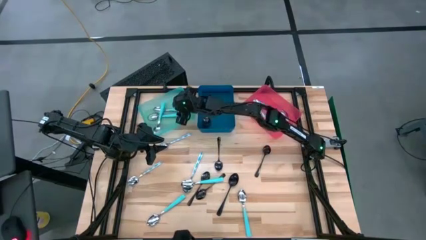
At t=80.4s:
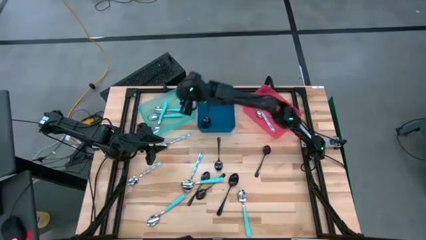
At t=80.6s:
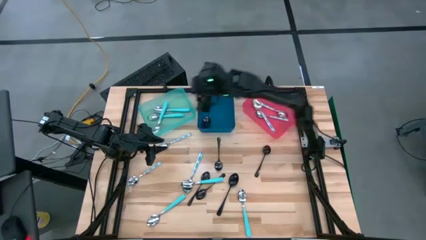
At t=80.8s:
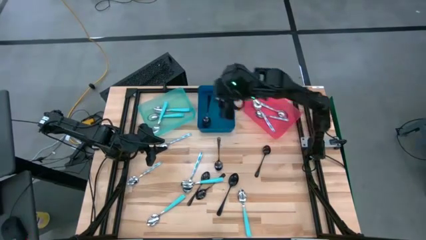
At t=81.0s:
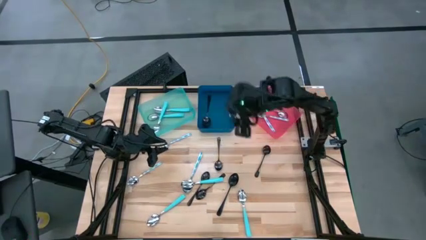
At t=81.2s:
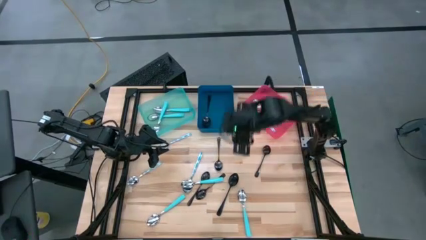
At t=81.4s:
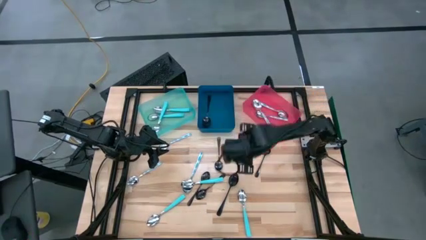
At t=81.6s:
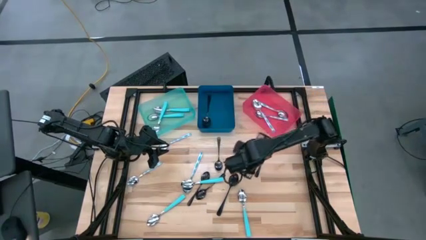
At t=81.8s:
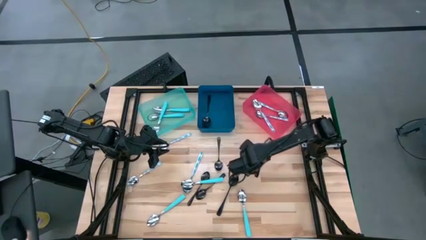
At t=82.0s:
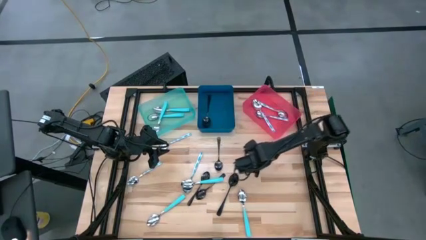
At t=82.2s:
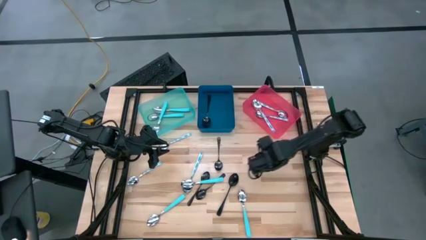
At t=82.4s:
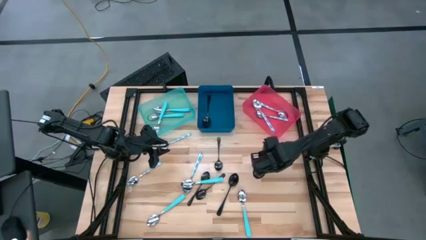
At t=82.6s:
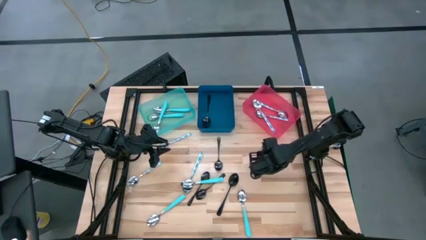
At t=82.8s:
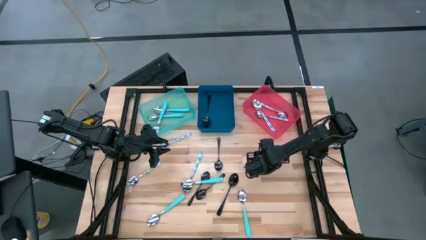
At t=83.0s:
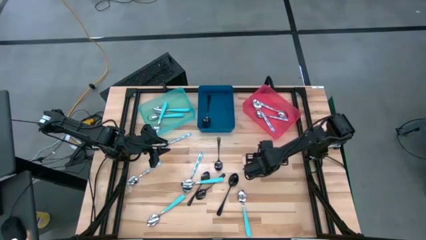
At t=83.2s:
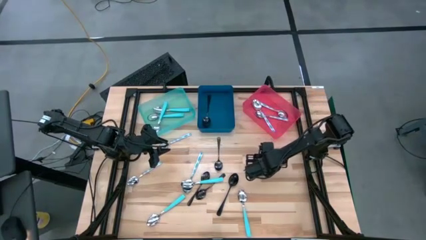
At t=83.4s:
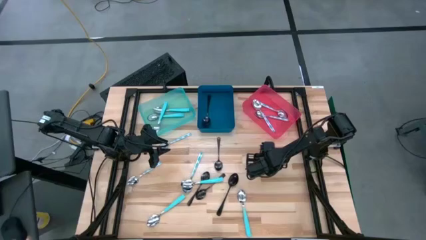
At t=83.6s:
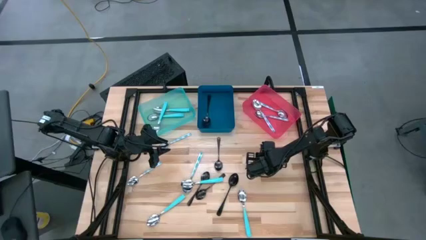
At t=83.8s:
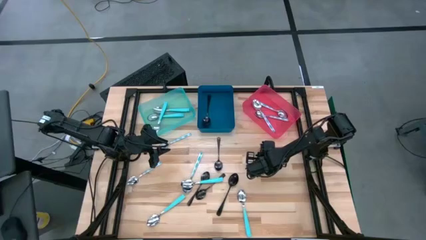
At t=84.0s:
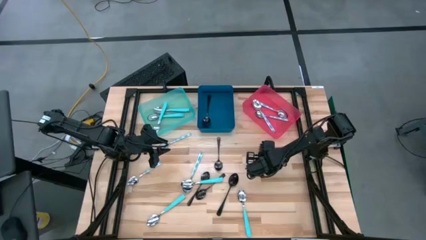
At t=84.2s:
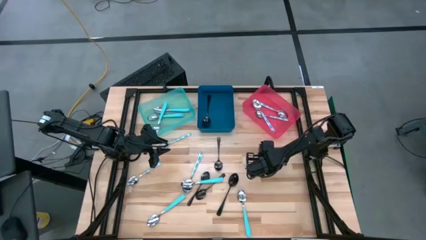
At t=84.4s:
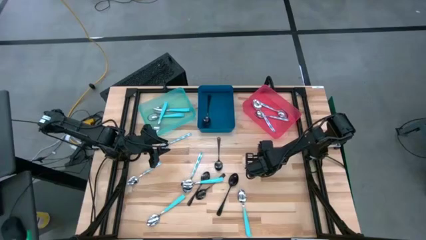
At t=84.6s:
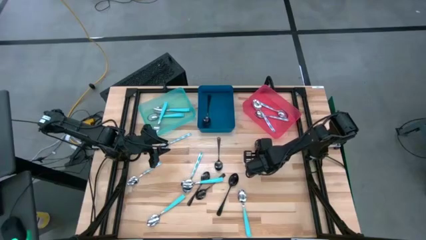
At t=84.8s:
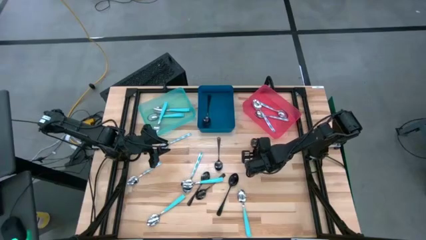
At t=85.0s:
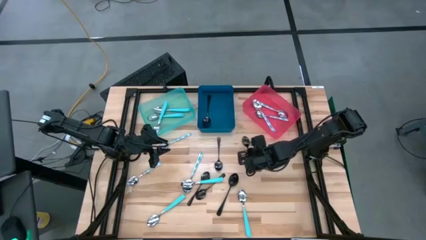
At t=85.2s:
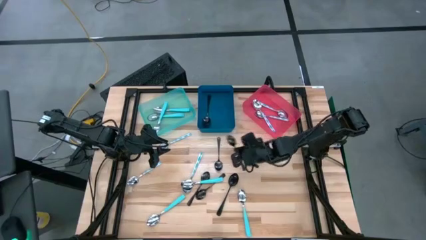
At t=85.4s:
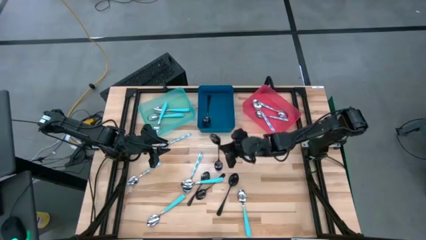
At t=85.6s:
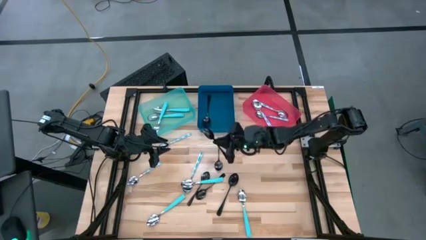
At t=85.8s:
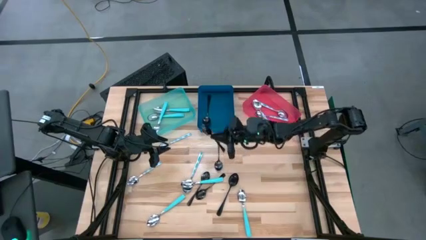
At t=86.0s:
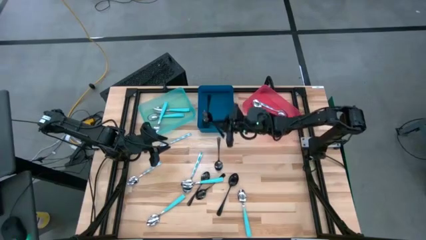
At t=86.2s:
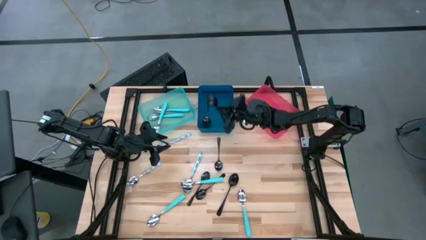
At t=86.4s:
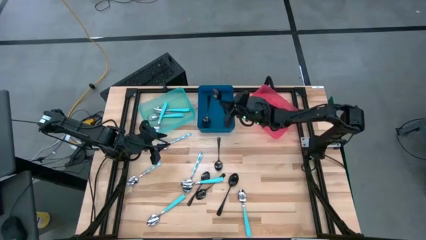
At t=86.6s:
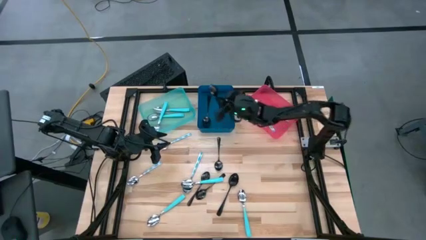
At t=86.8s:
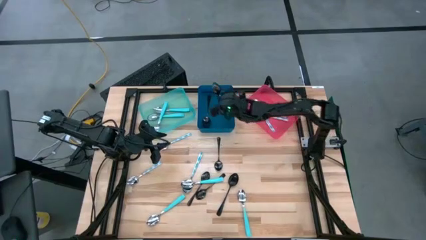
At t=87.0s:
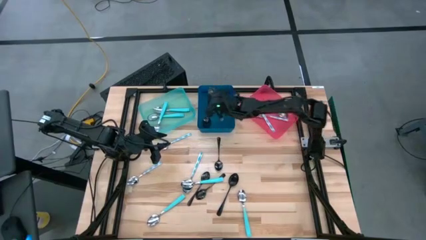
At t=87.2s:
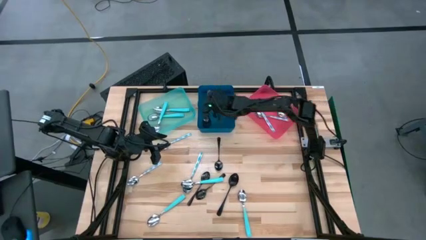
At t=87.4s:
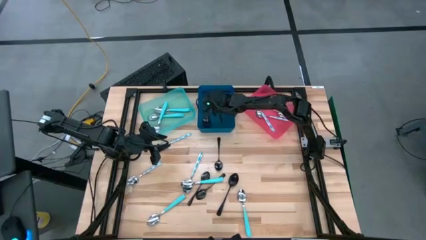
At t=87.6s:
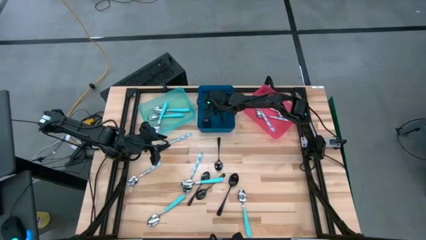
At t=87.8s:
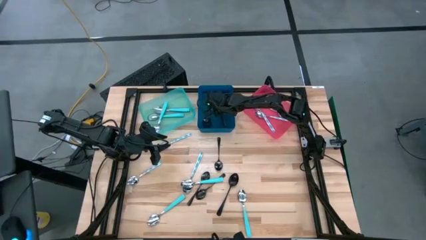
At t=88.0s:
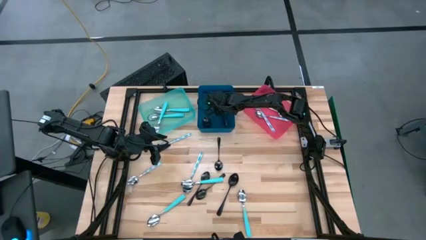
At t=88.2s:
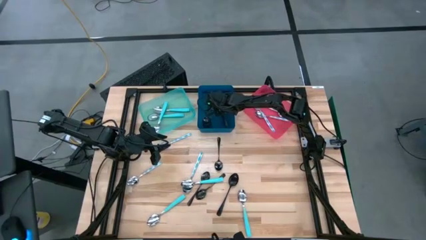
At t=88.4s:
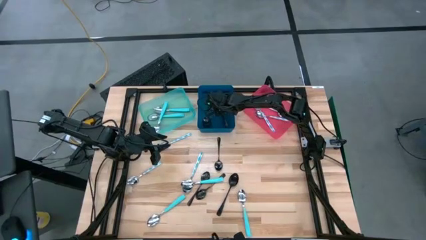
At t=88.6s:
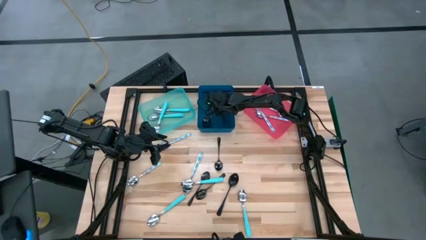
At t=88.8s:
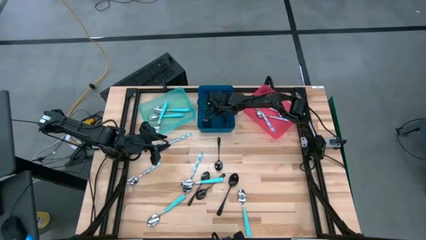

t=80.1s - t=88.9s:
Task: Sort silverware by color (type)
Put the black spoon into the blue bin
